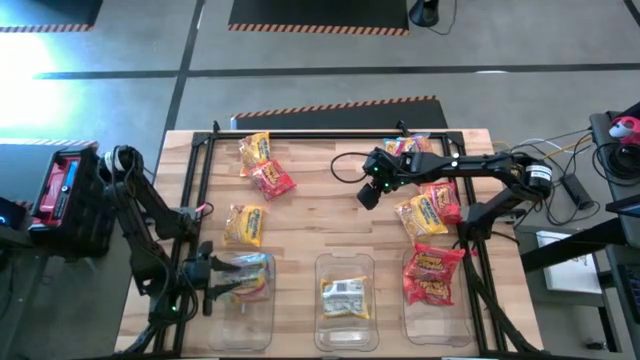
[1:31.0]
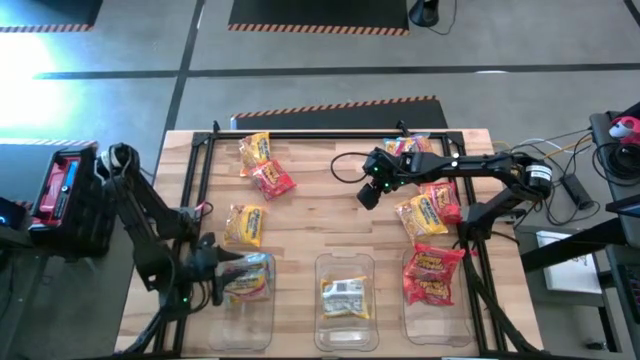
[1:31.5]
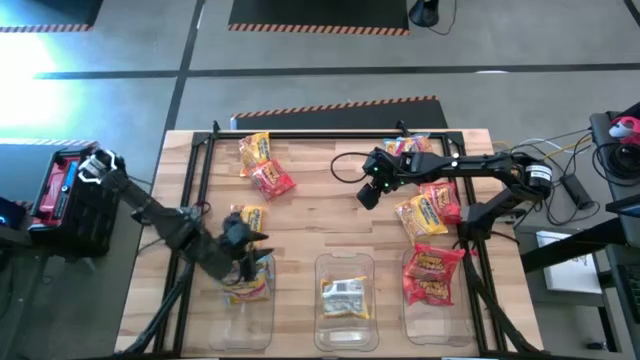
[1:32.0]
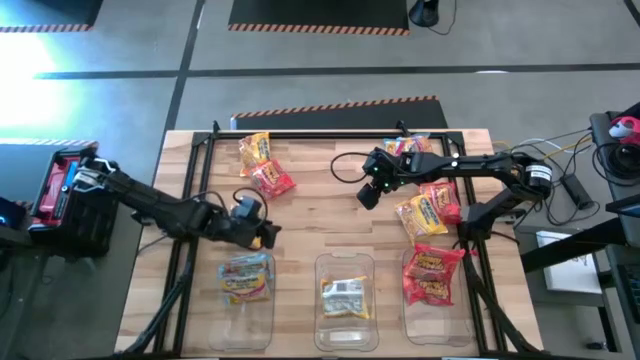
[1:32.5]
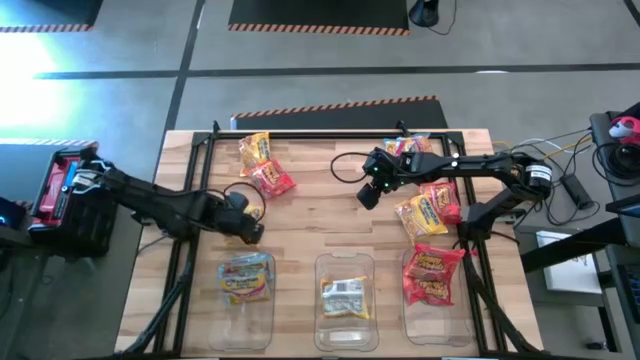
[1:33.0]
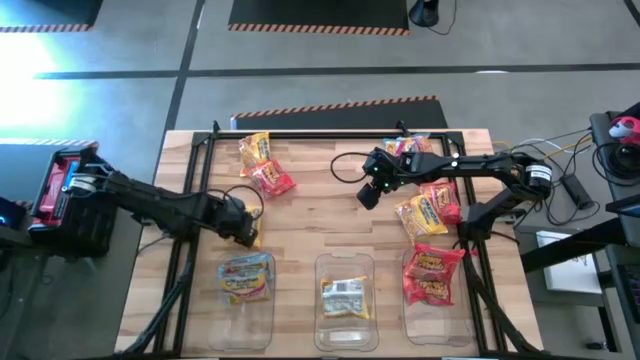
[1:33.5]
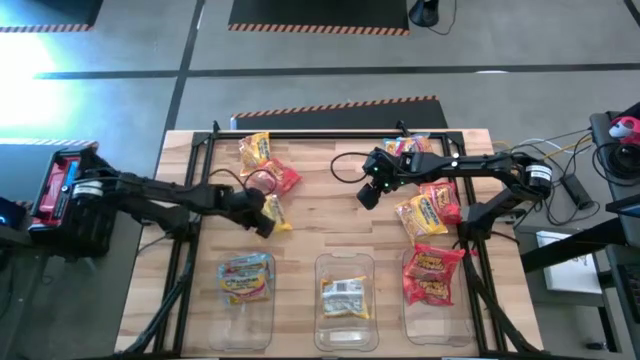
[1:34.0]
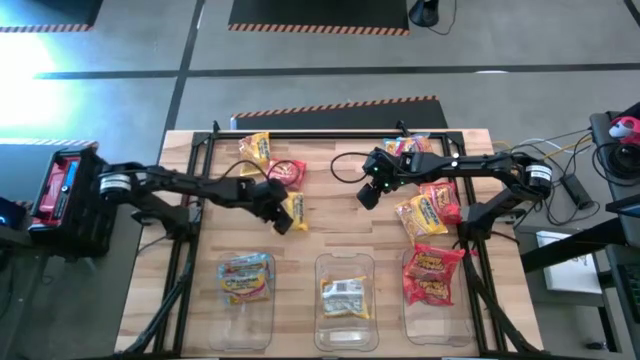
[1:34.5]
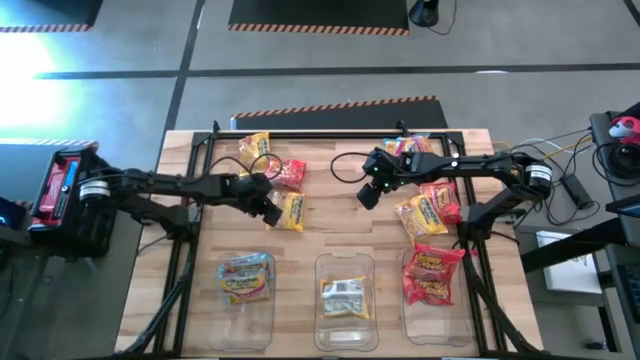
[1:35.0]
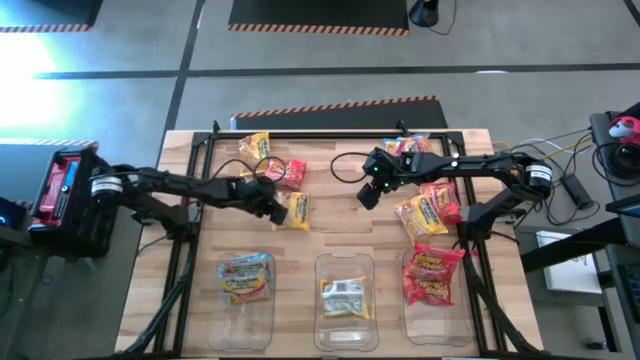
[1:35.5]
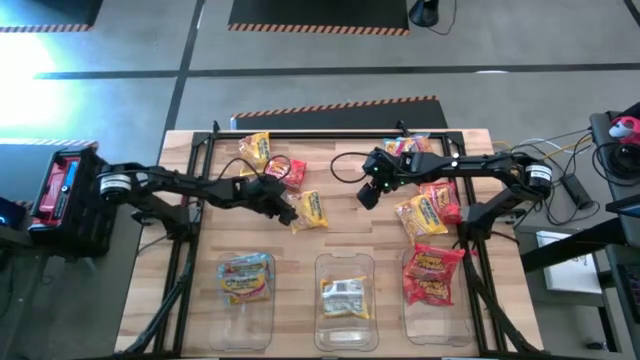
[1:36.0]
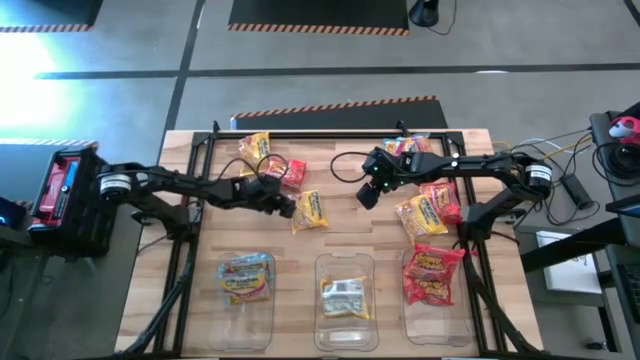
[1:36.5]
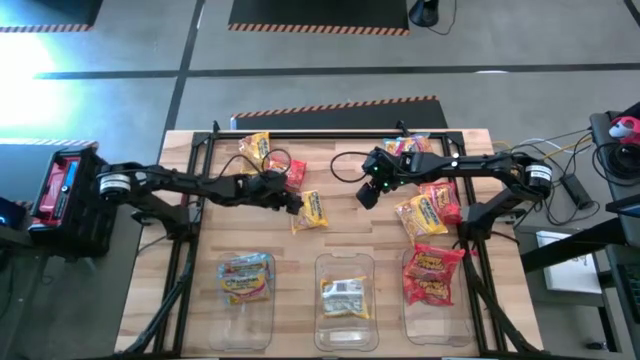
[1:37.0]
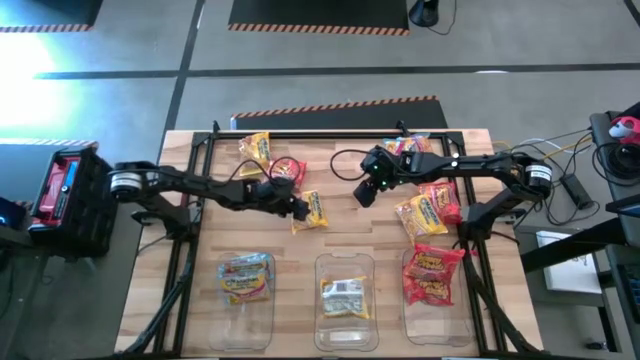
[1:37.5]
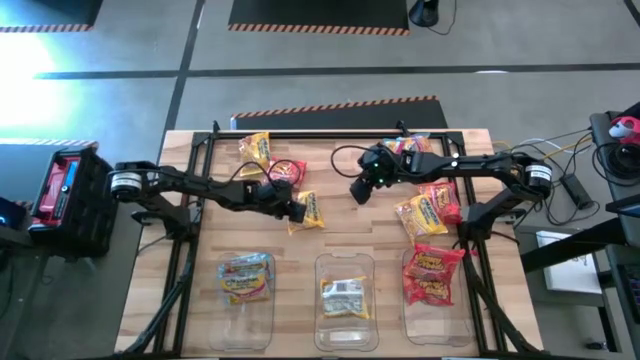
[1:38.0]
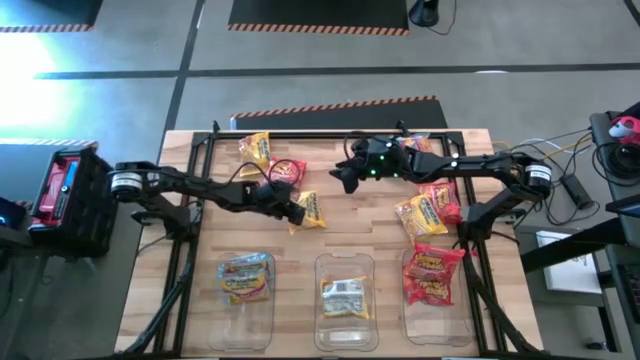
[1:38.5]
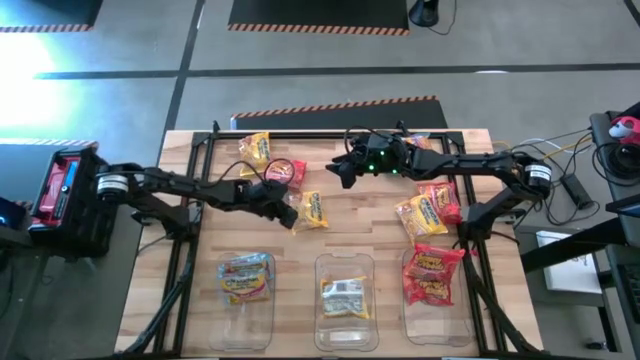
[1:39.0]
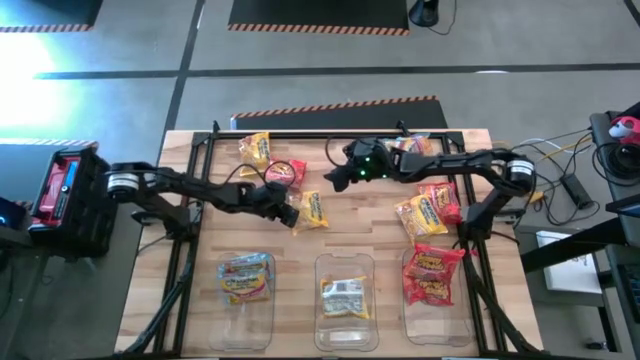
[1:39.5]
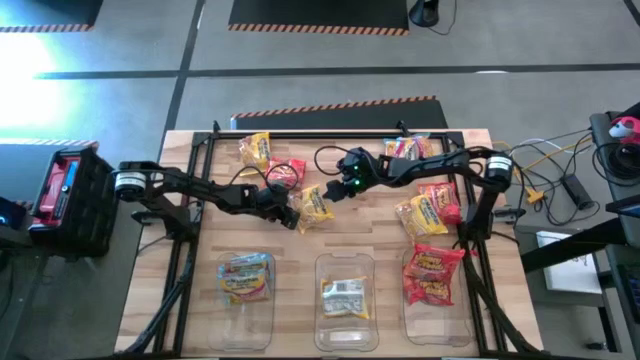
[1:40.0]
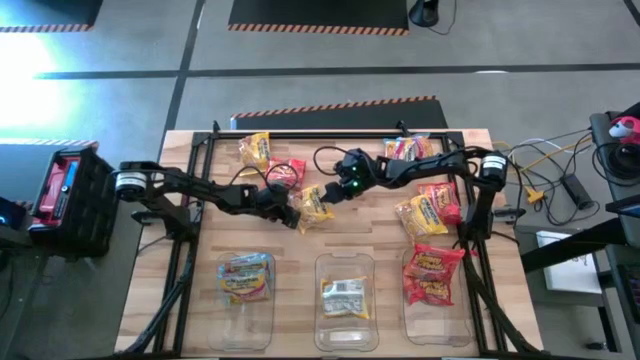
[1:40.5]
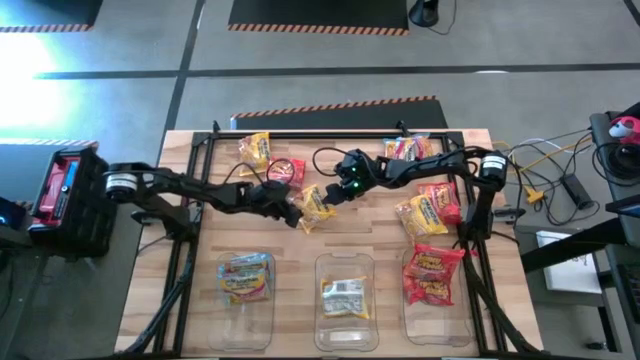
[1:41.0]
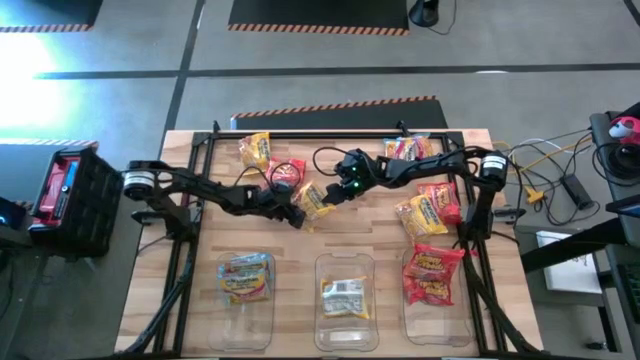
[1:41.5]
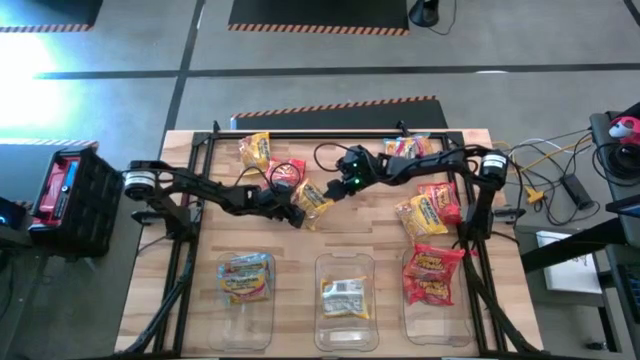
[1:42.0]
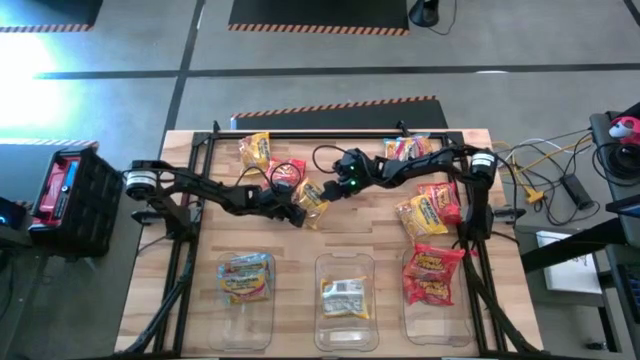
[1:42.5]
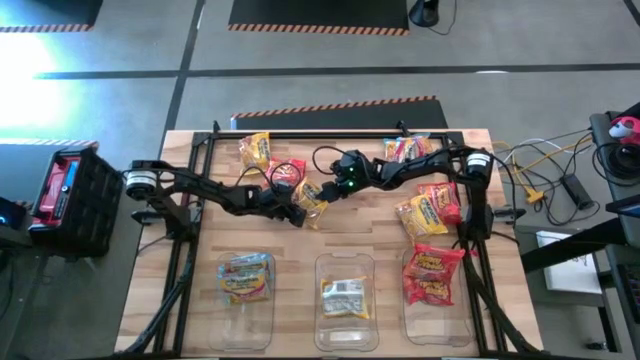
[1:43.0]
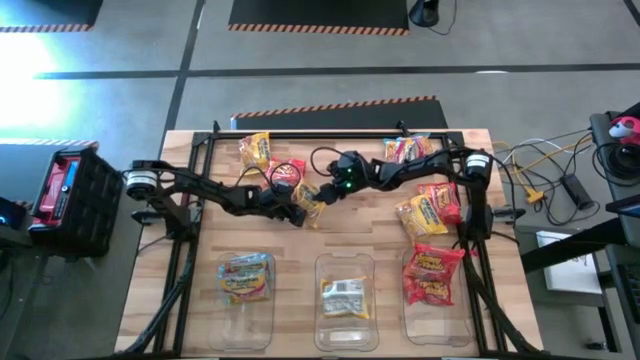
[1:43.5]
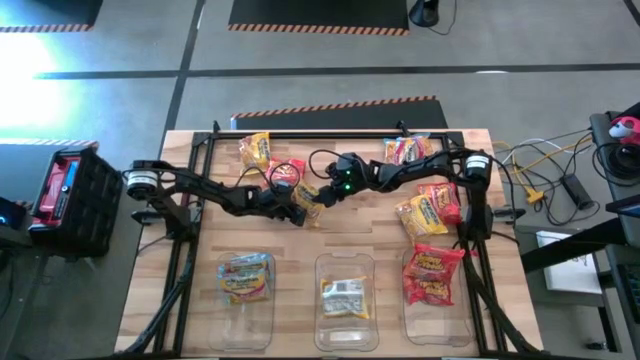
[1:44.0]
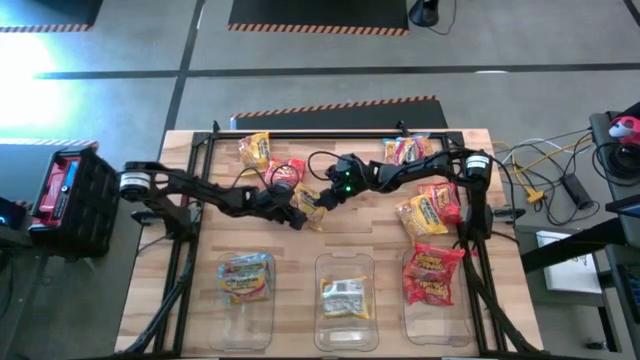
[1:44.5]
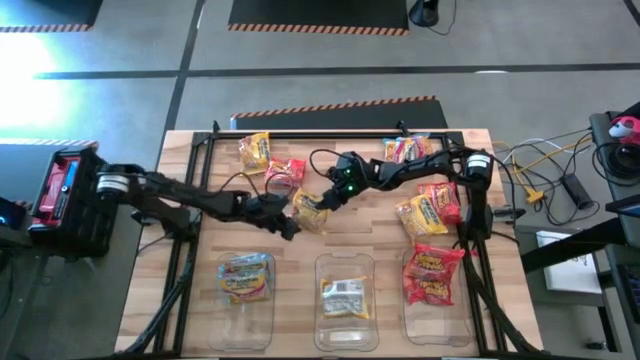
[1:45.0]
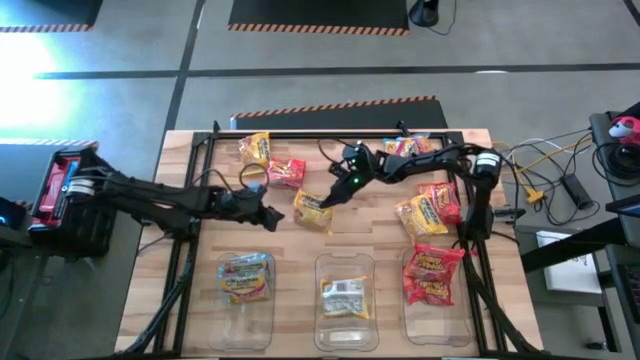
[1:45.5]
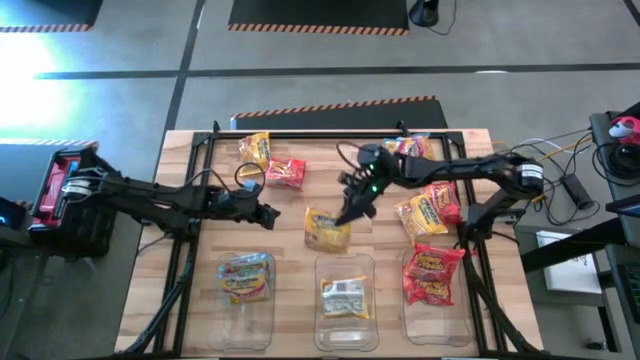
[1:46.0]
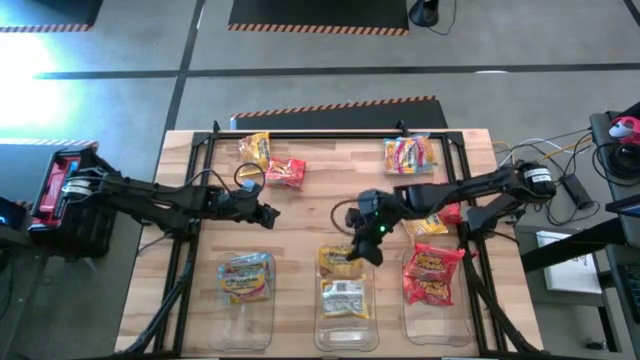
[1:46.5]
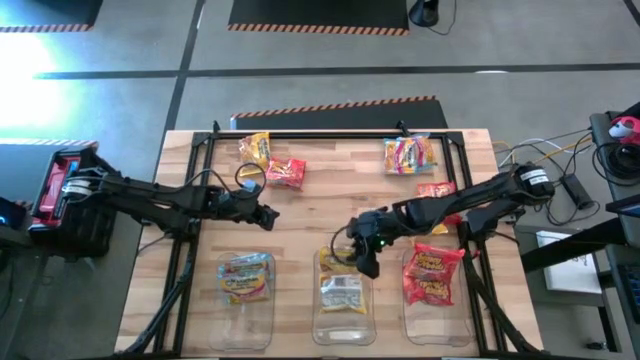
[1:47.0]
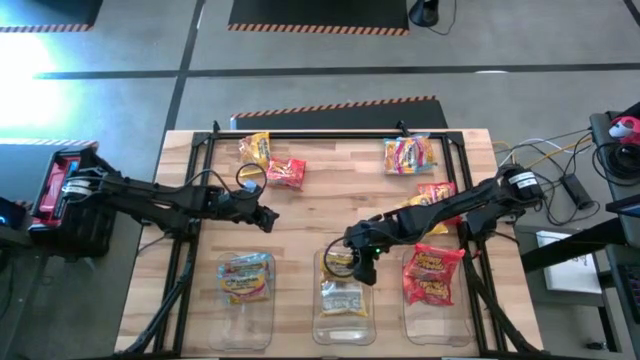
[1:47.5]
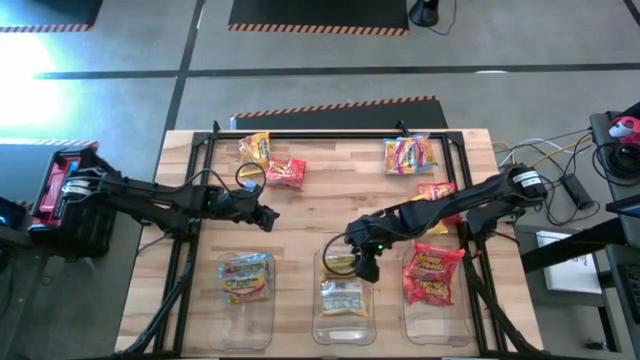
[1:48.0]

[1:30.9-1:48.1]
Task: Sort Maruchan noodles
Put the yellow noodle pack into the middle transparent bin
